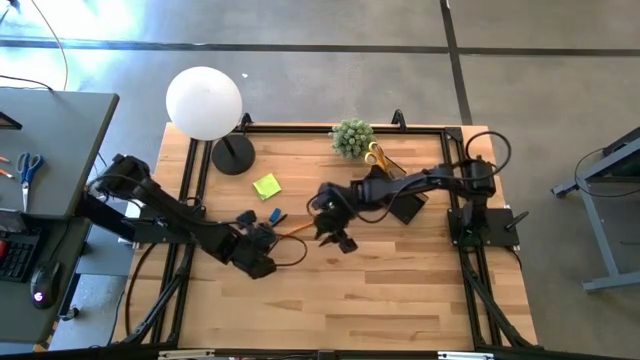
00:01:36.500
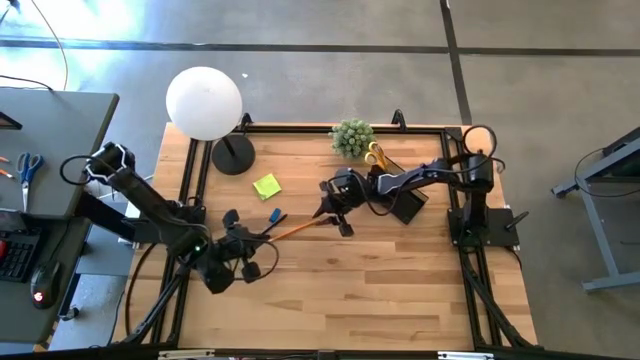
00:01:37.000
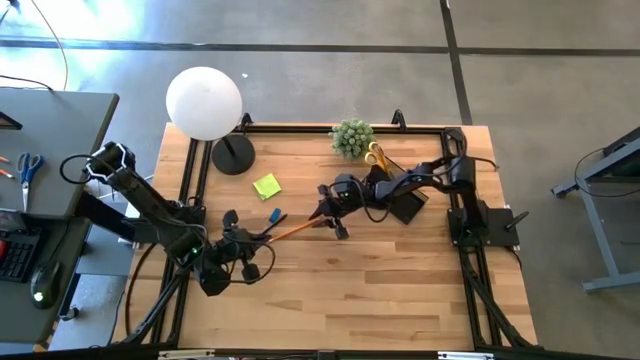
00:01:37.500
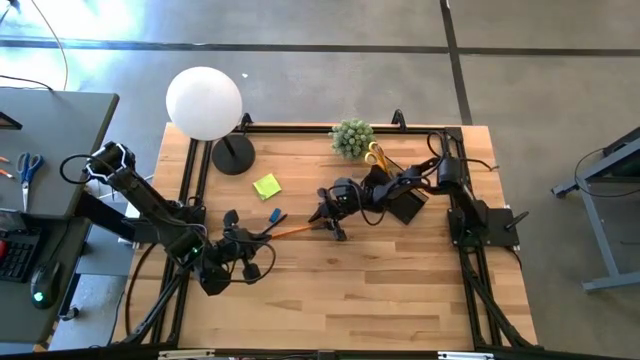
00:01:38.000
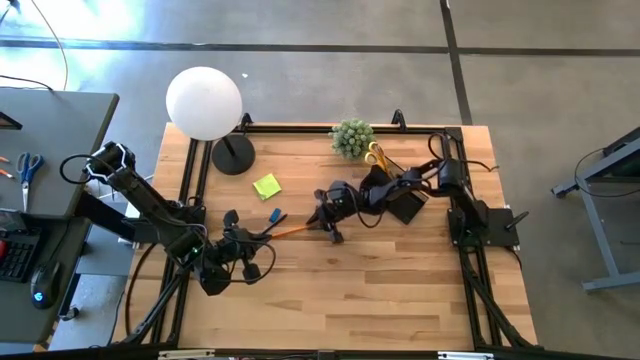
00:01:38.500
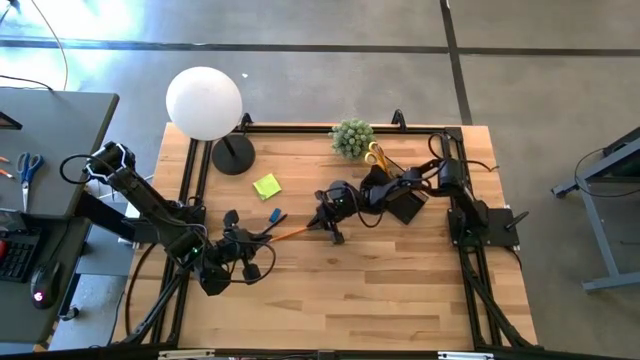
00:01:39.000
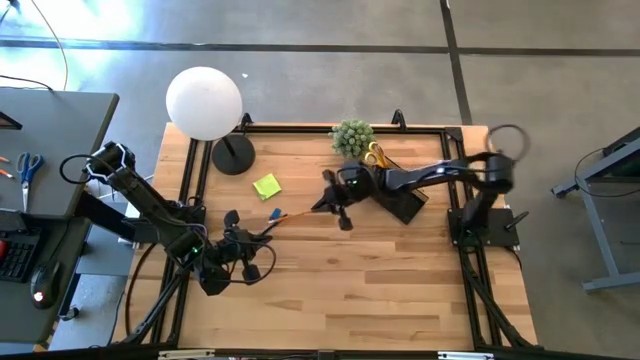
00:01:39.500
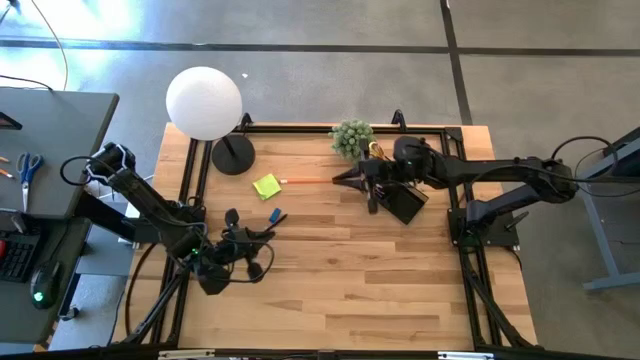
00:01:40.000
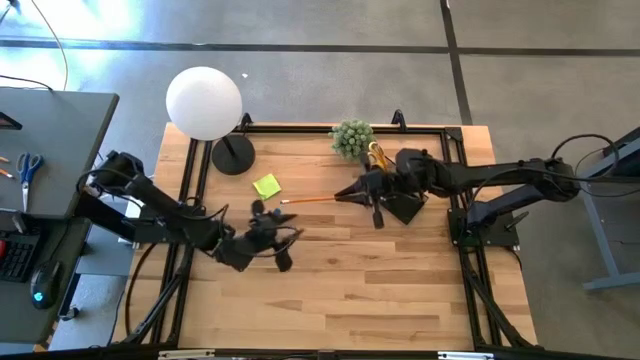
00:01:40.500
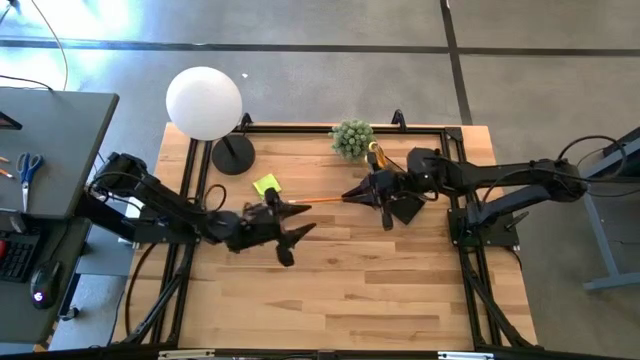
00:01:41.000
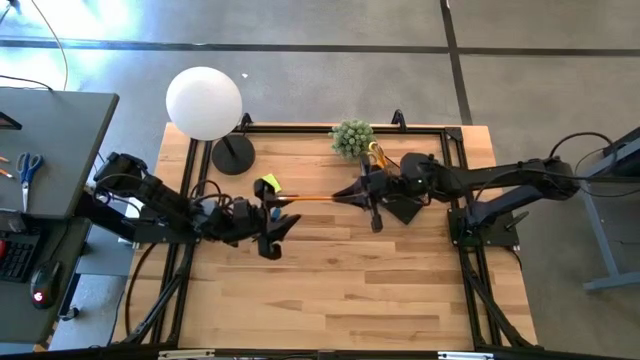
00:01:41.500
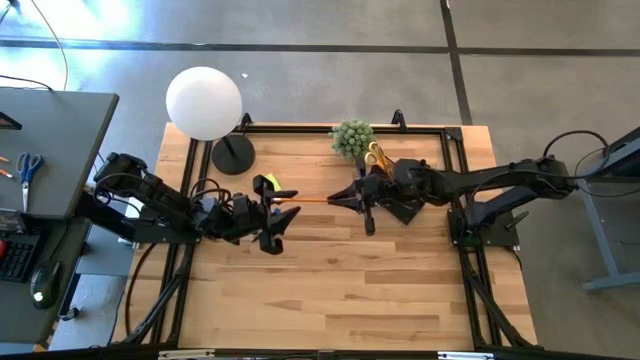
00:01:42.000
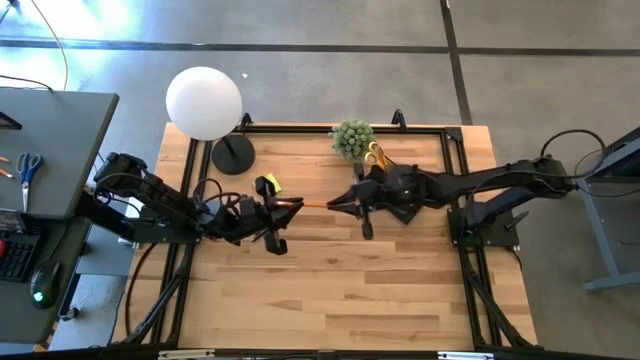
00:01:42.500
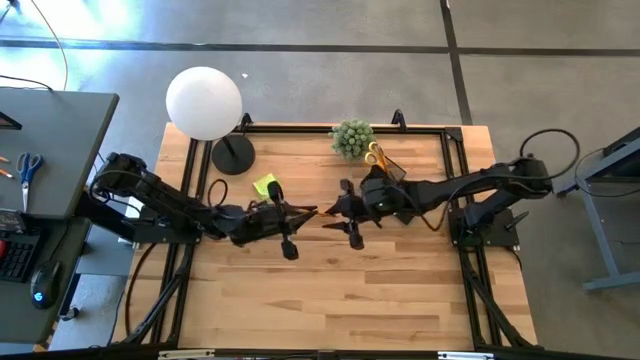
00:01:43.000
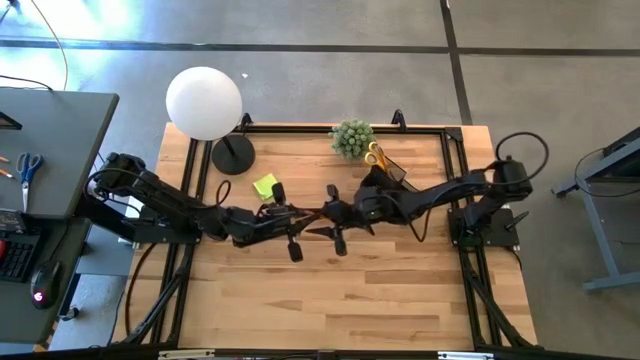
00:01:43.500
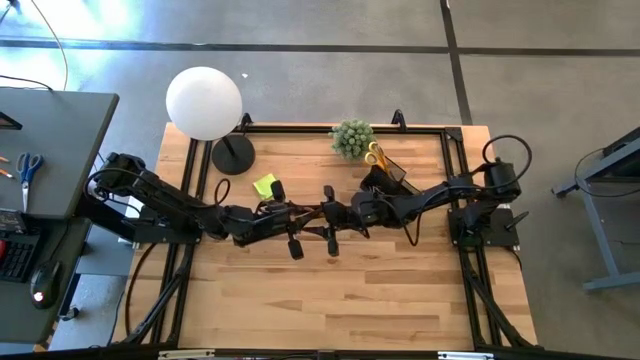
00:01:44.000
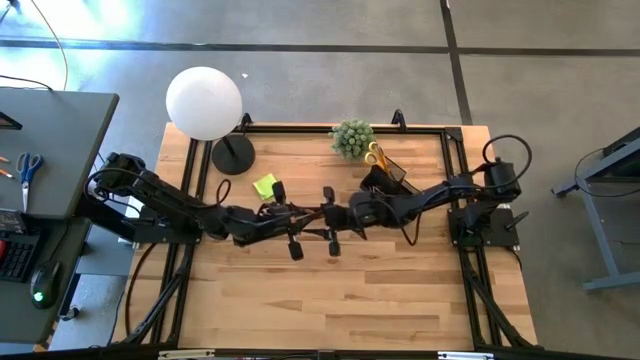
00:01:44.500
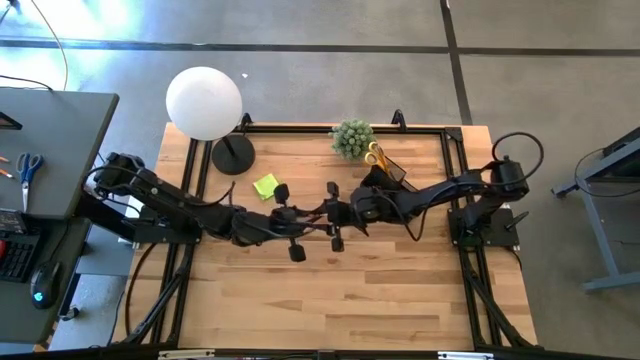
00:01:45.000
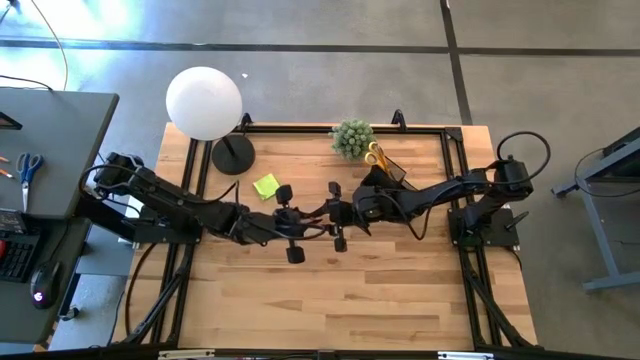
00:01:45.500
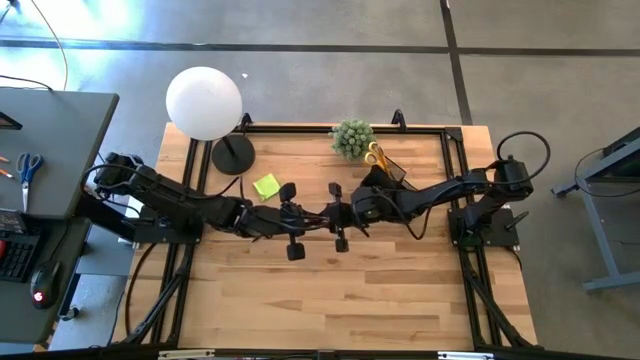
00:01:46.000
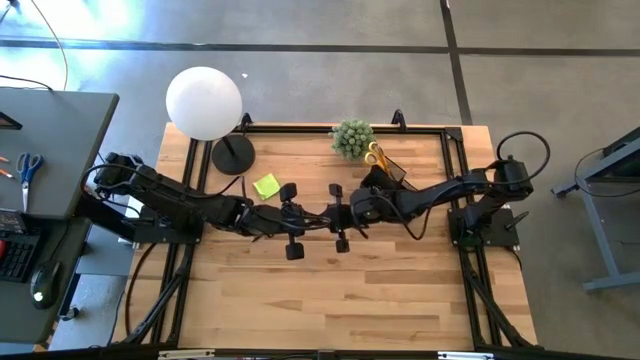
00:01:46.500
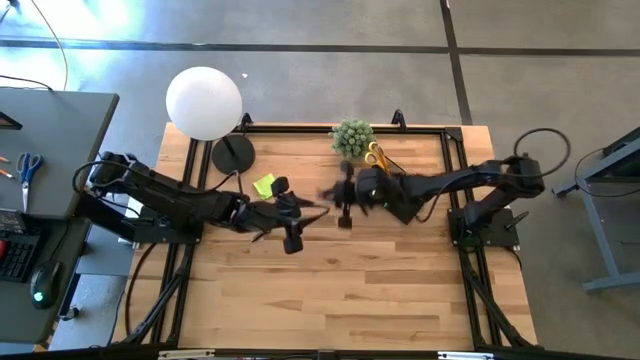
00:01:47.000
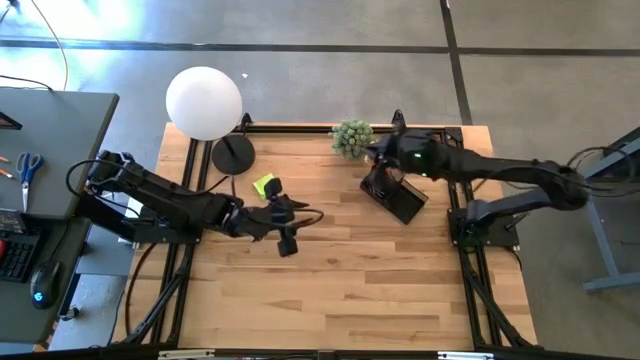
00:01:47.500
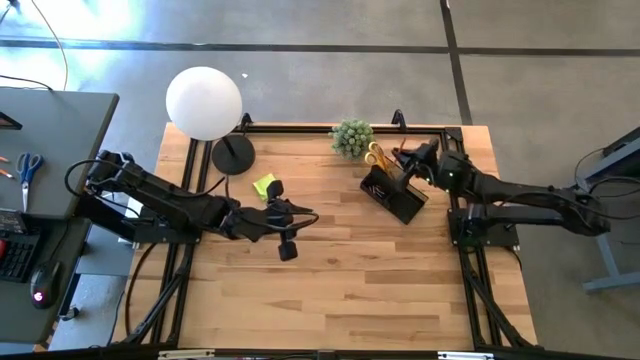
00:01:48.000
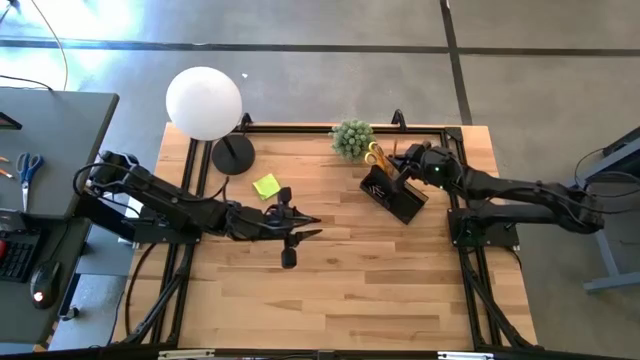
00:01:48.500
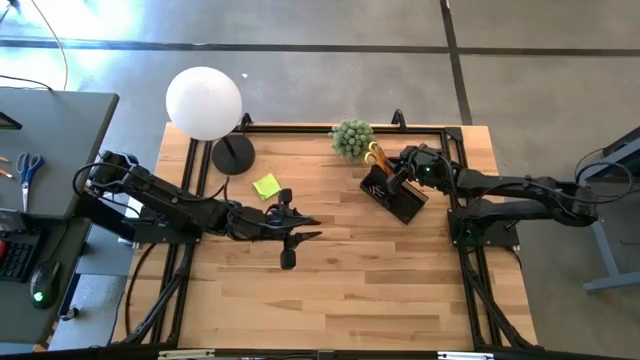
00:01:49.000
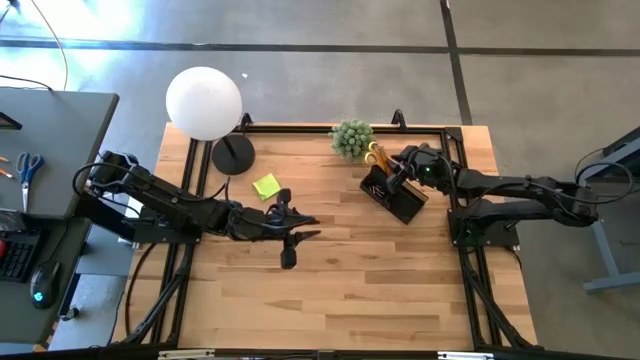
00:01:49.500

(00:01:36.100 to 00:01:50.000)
Task: Pick and place office supplies into organizer
Put the orange pencil into the desk organizer

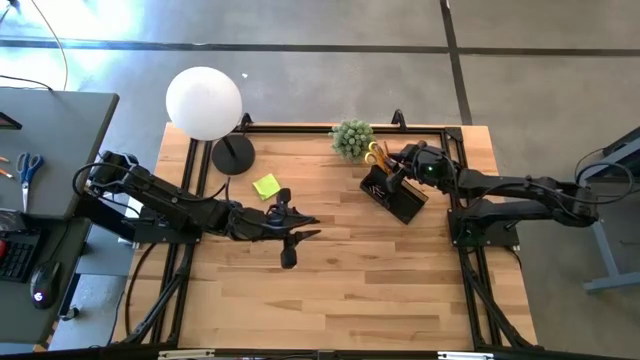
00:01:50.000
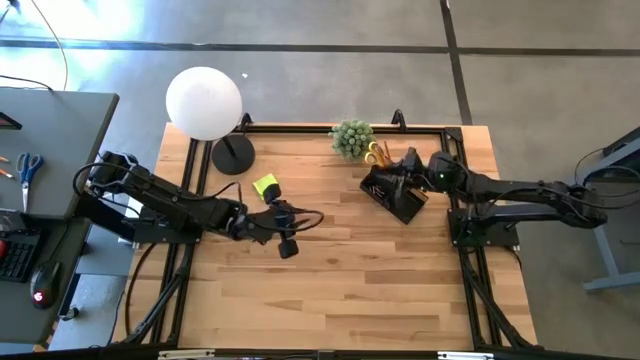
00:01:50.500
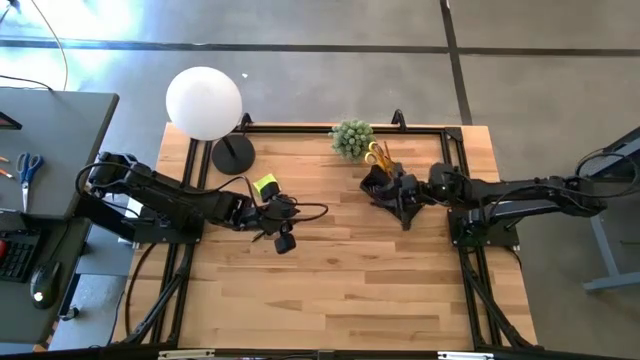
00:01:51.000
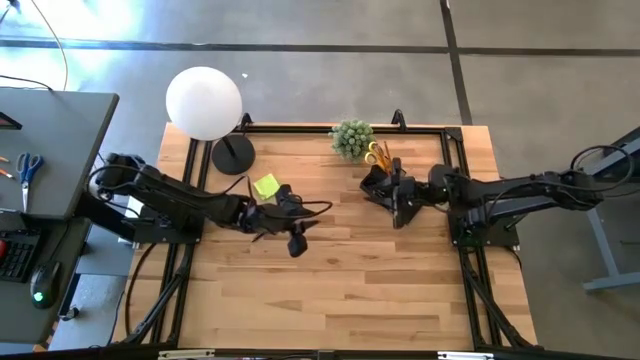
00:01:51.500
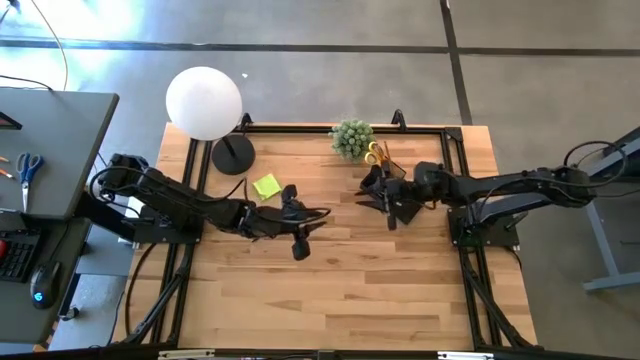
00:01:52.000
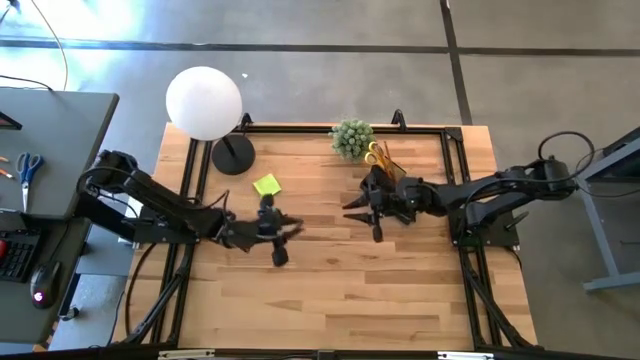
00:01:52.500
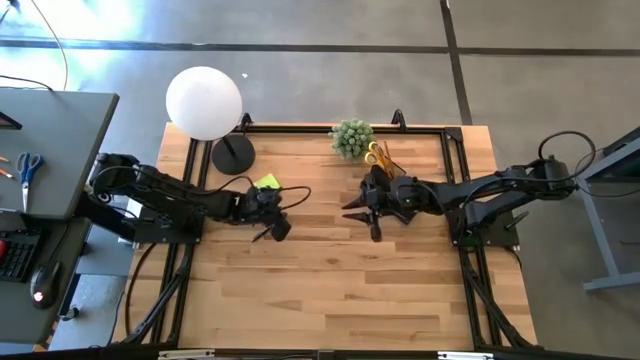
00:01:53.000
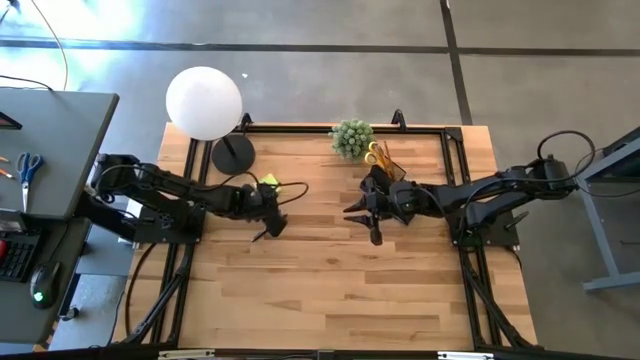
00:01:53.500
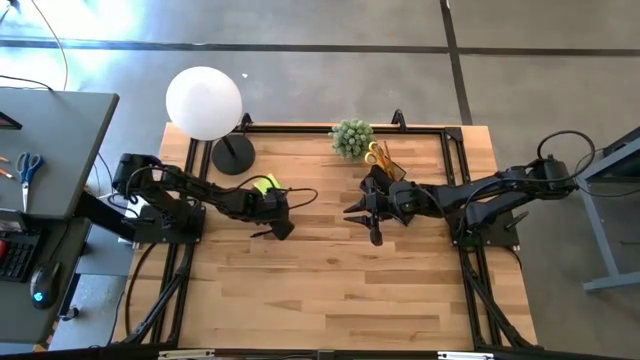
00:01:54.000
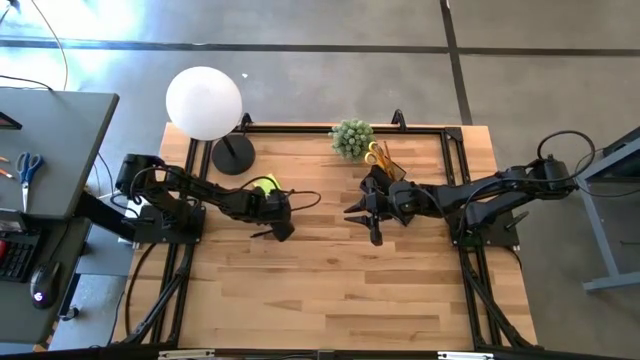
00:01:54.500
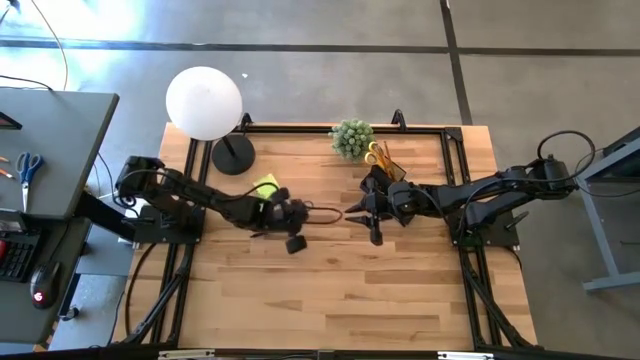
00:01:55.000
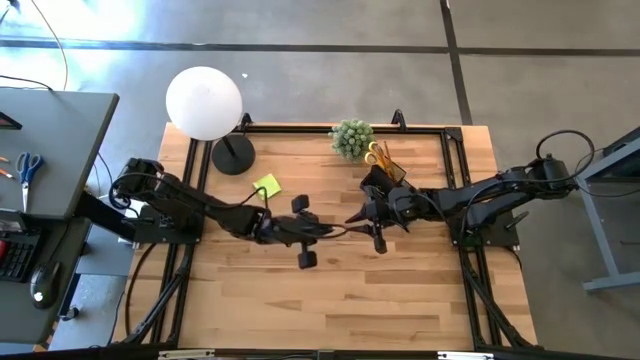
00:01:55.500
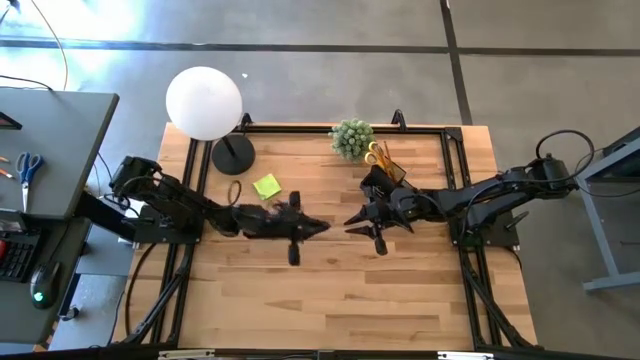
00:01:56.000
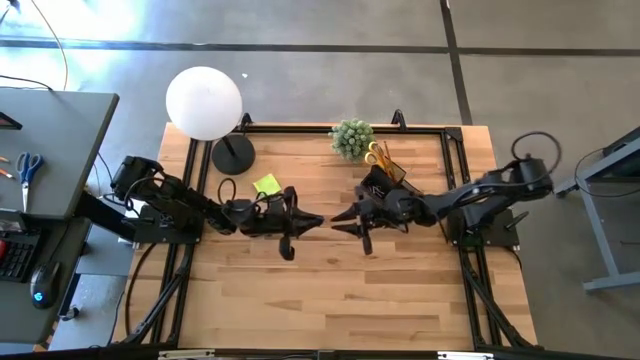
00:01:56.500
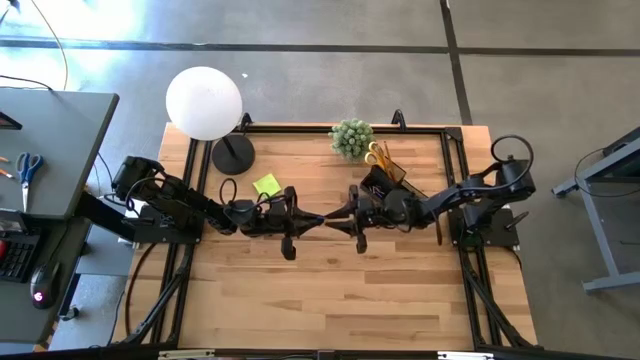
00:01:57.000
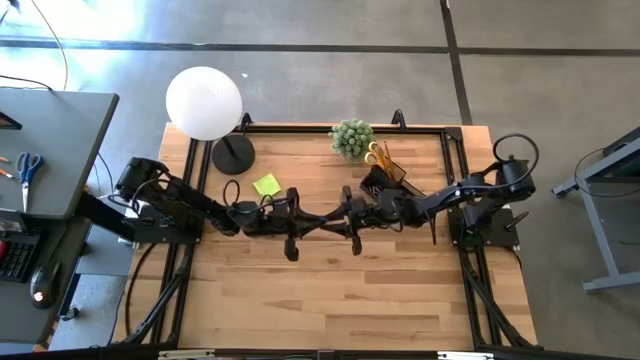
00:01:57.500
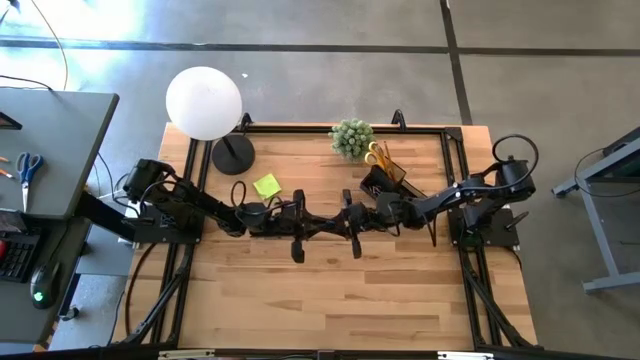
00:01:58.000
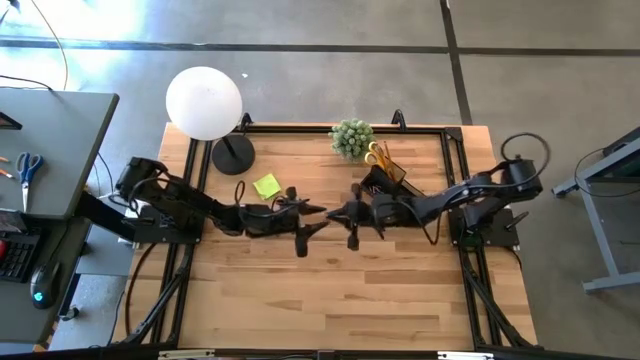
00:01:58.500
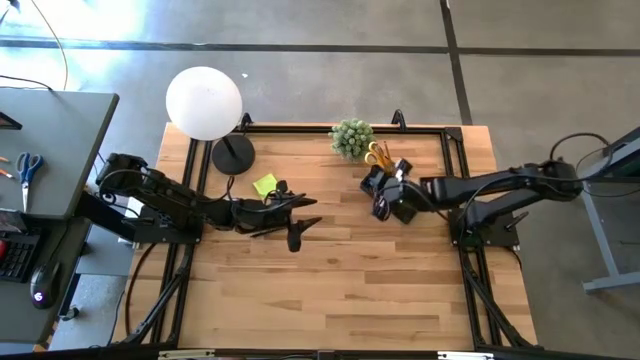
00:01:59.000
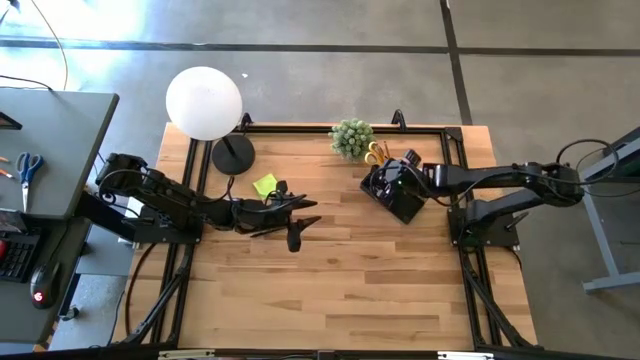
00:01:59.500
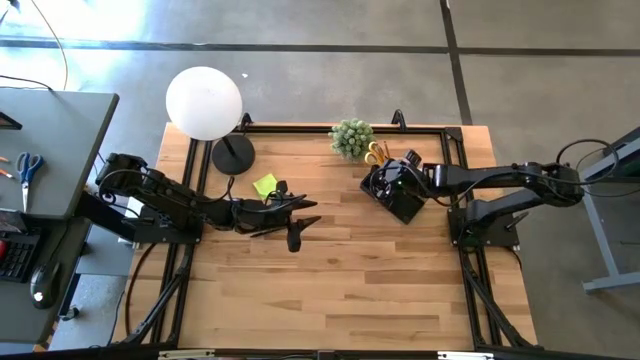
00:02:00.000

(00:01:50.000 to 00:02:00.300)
Put the blue eraser into the desk organizer
